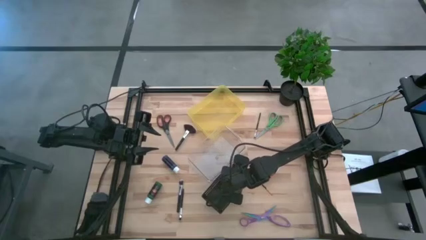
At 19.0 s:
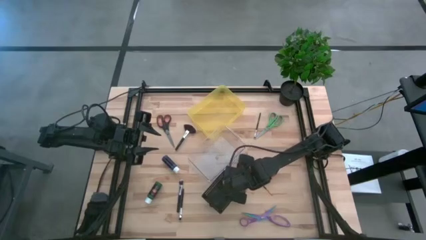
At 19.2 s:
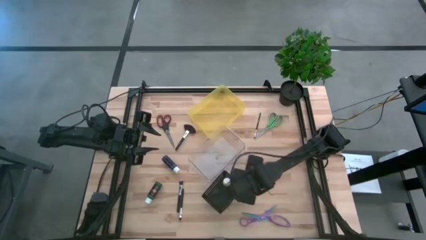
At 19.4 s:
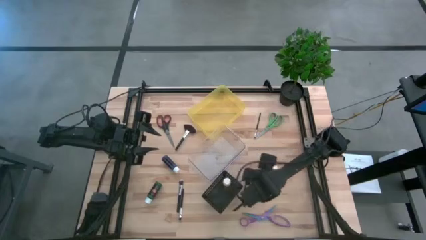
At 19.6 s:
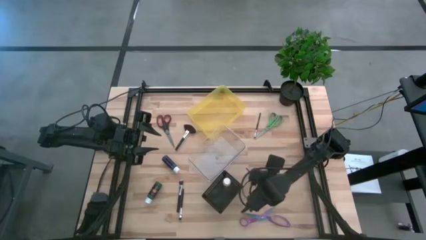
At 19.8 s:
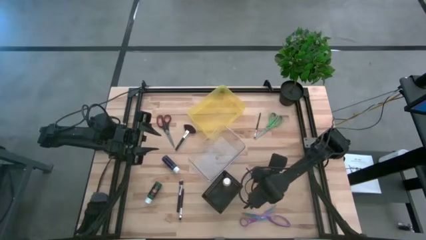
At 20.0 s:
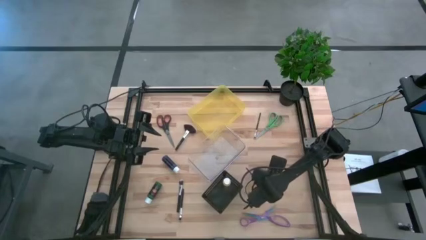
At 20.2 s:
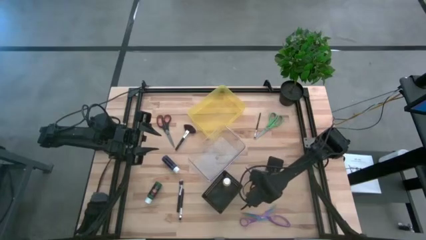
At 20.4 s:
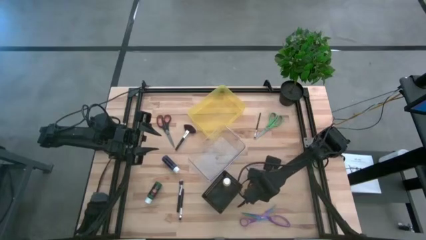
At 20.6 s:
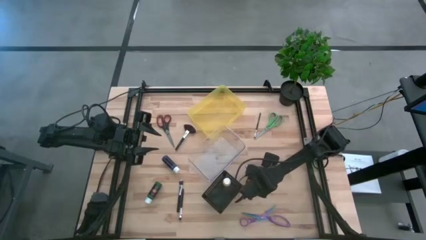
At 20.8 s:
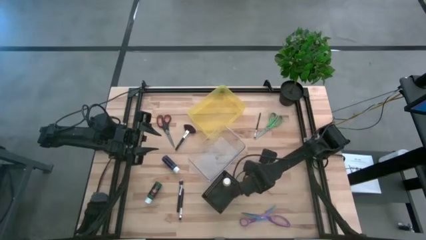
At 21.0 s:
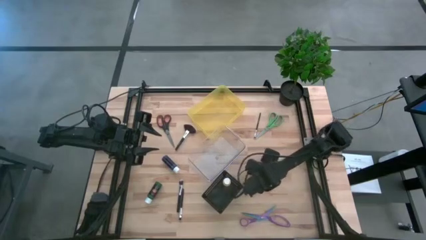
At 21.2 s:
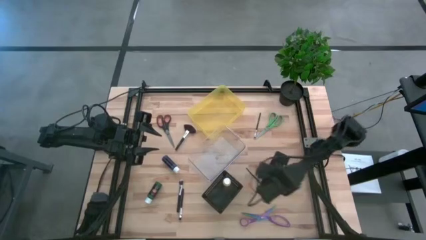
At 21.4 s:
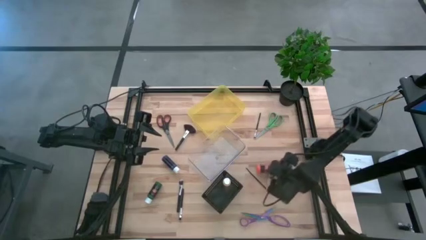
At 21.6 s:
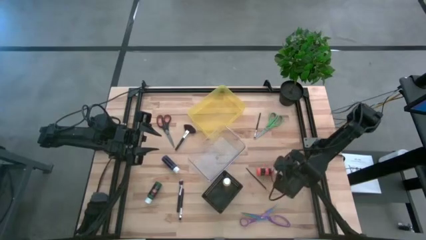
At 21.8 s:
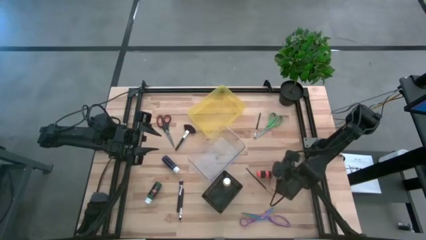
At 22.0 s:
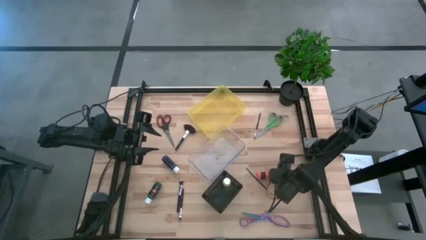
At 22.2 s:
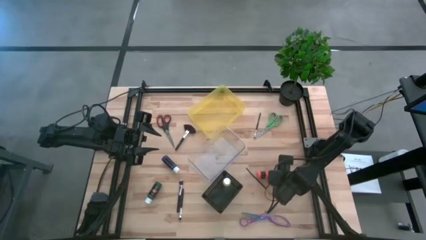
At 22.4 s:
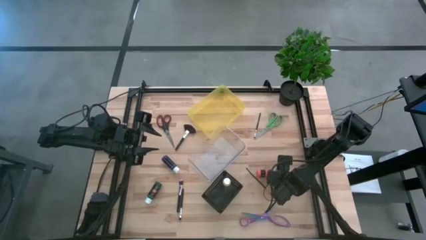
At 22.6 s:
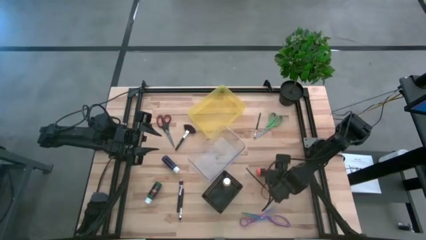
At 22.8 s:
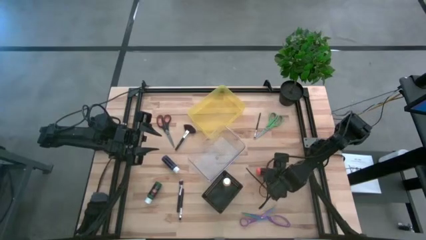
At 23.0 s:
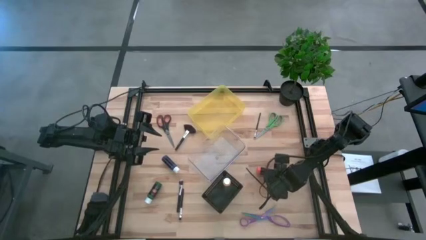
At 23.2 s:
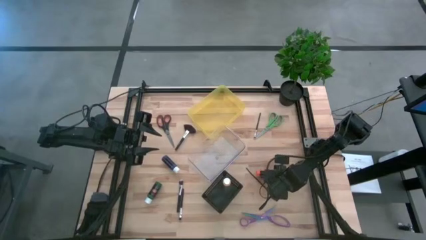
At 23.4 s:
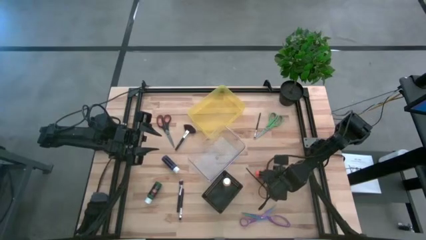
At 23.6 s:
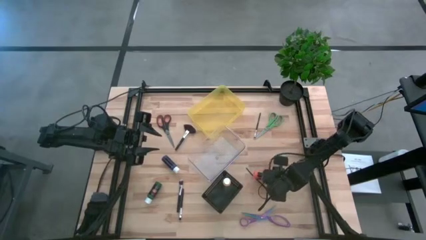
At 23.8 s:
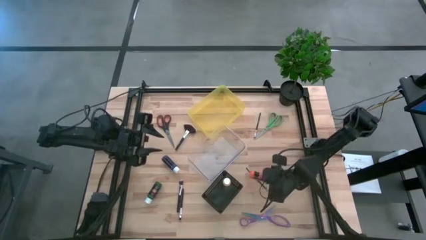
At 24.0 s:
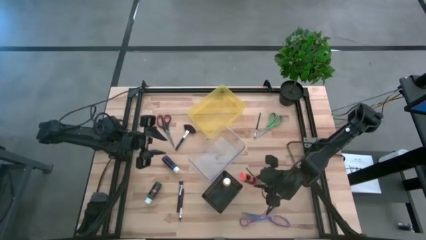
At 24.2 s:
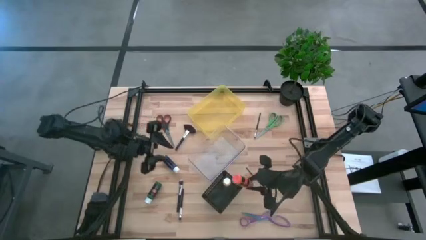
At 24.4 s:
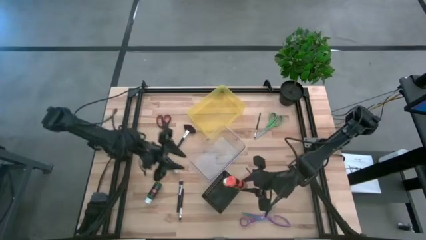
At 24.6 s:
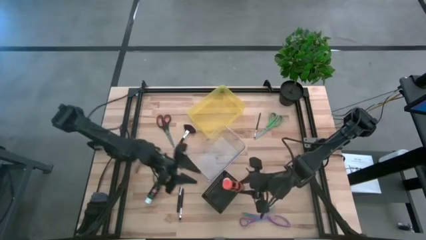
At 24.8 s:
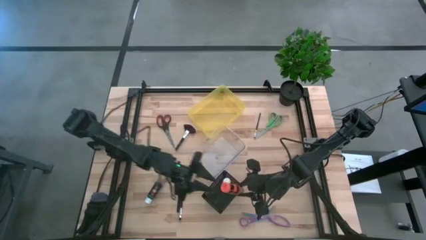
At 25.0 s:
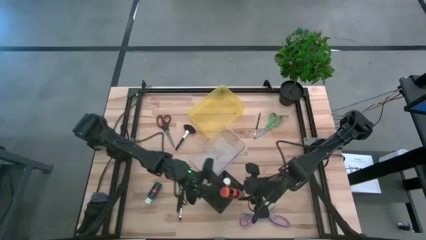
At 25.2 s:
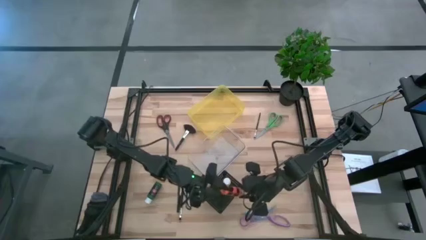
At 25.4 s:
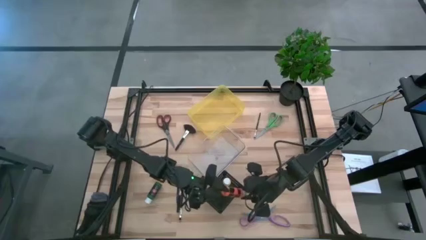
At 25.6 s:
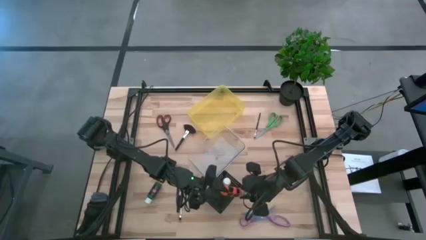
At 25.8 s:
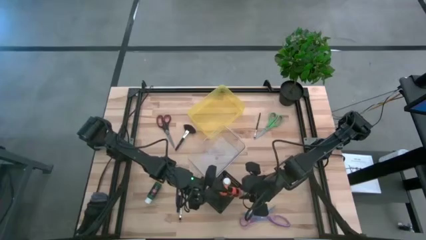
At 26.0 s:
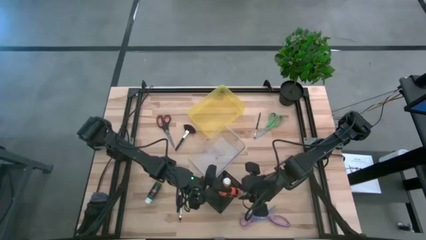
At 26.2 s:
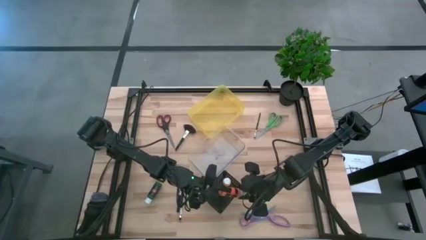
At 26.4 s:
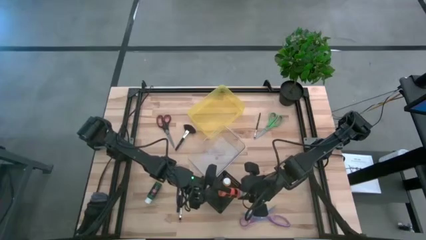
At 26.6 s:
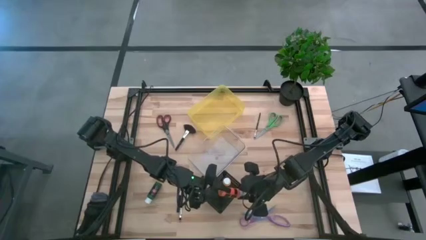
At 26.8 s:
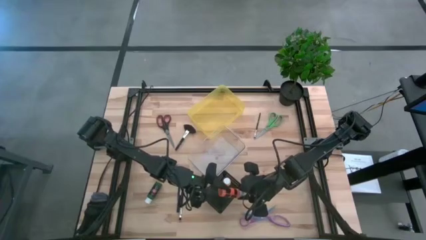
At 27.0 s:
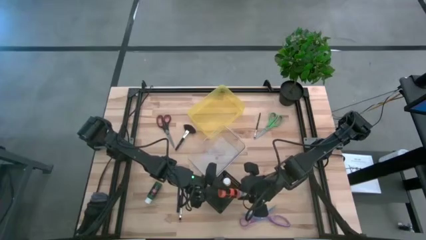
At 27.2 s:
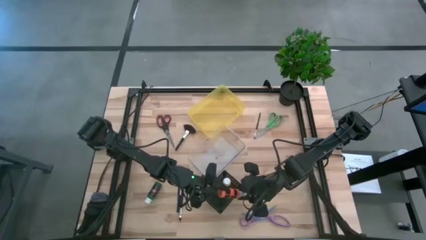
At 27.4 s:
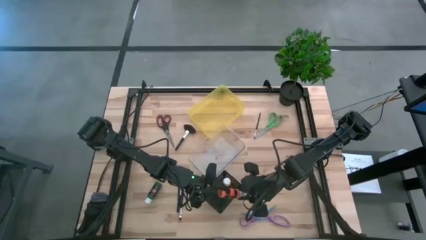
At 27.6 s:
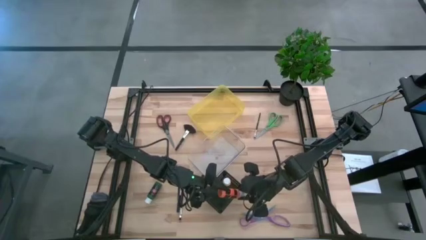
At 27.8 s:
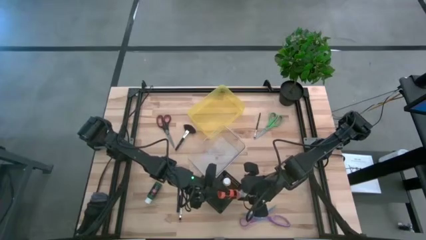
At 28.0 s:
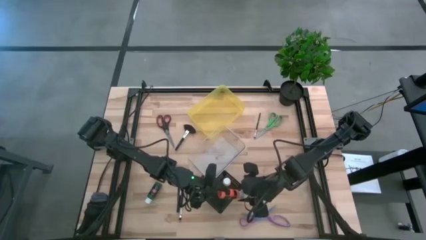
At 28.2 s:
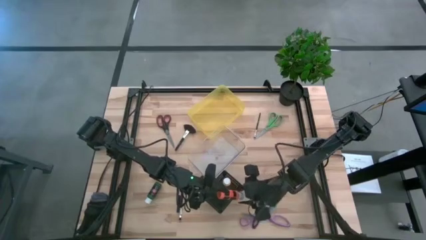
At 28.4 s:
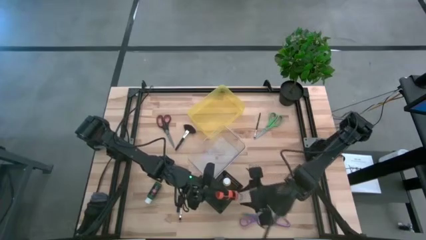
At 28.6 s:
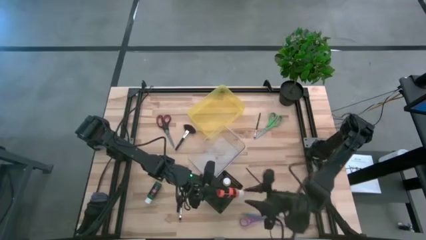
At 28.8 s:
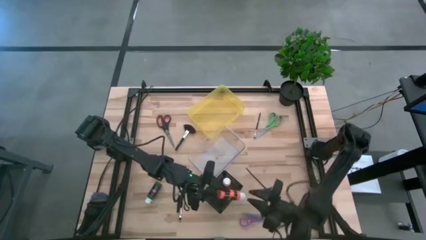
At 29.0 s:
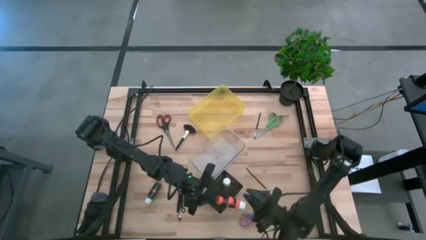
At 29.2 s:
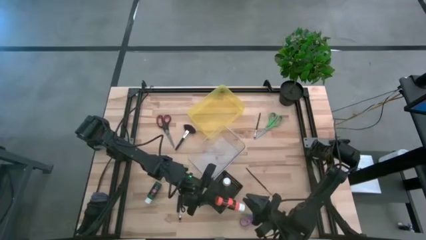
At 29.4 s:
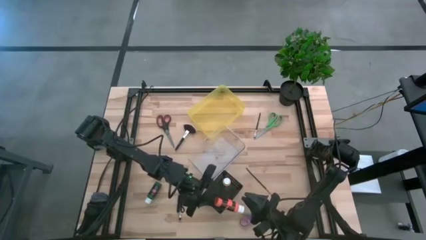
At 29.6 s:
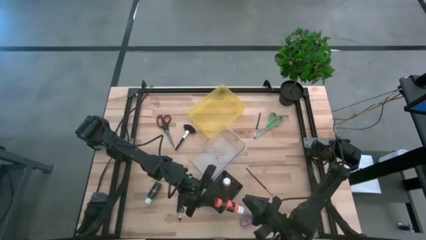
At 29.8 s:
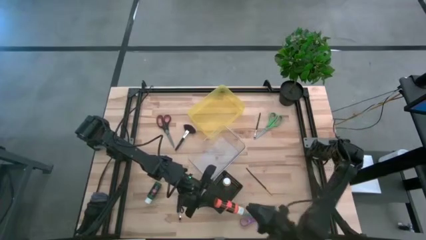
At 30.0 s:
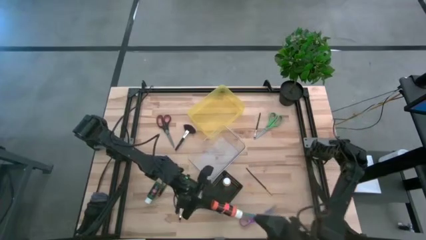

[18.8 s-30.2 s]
Task: Pick & Place Paint Supplies
Put the orange paint bottle into the black bin
